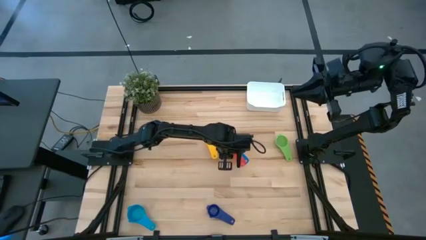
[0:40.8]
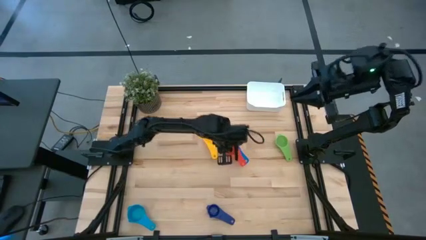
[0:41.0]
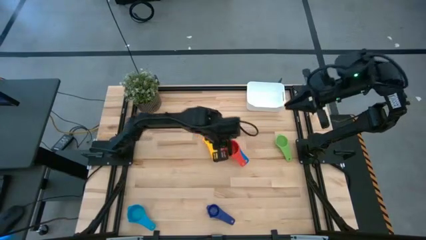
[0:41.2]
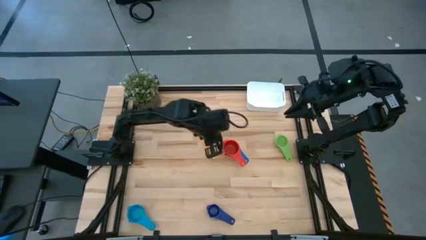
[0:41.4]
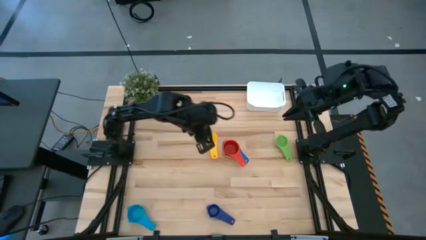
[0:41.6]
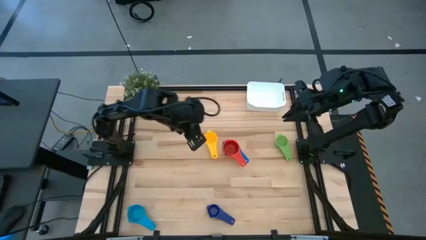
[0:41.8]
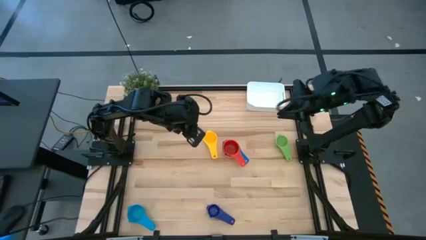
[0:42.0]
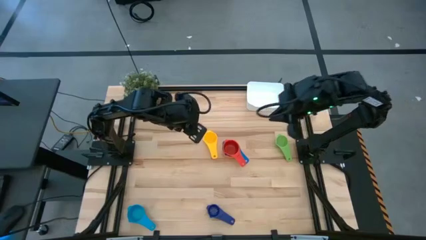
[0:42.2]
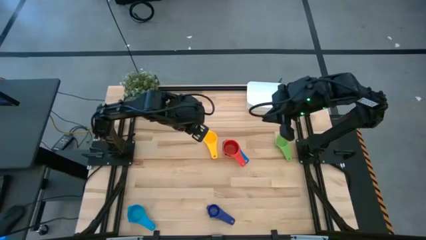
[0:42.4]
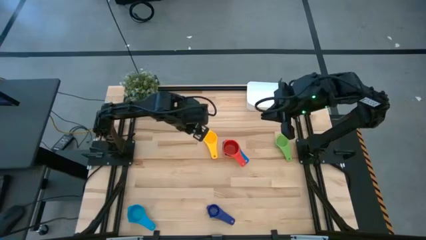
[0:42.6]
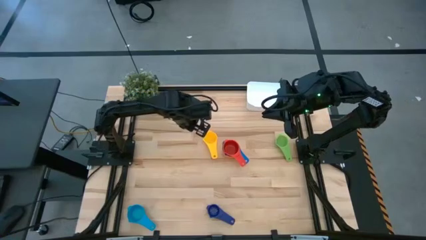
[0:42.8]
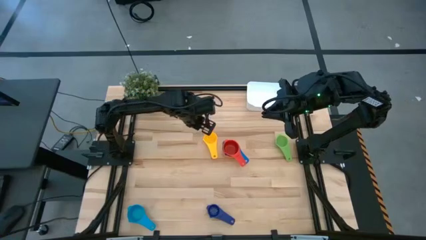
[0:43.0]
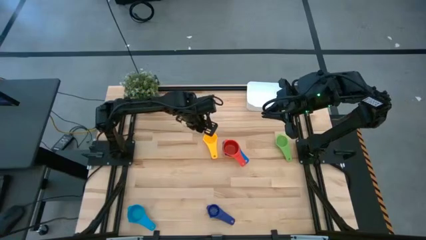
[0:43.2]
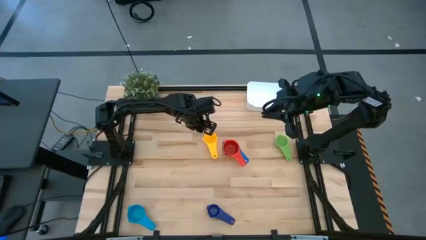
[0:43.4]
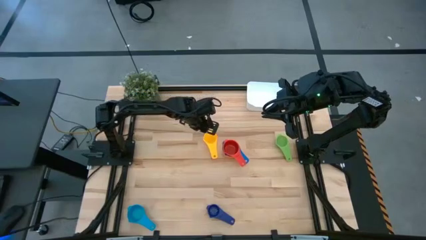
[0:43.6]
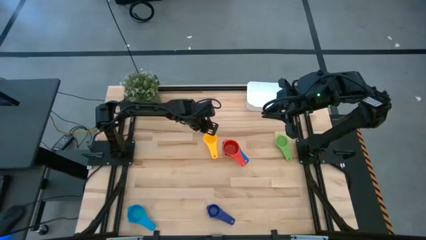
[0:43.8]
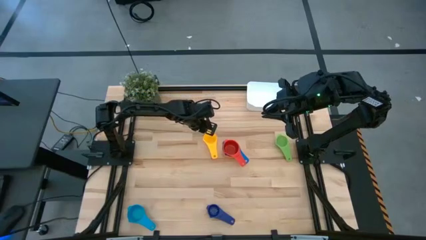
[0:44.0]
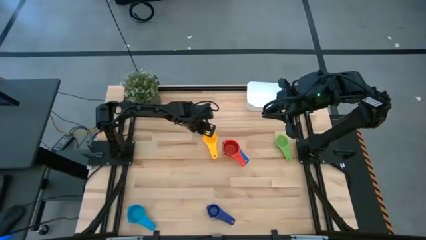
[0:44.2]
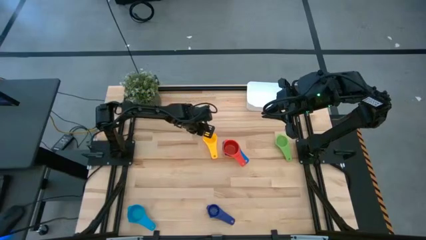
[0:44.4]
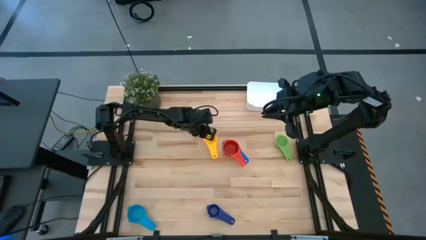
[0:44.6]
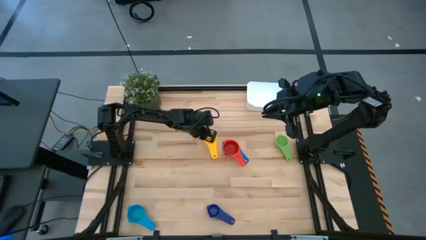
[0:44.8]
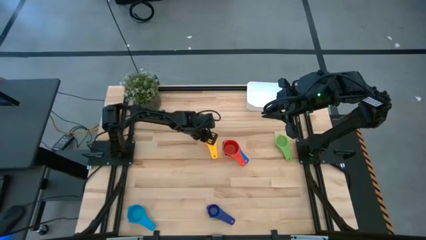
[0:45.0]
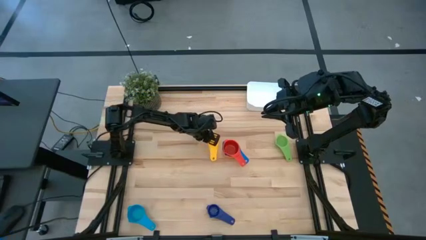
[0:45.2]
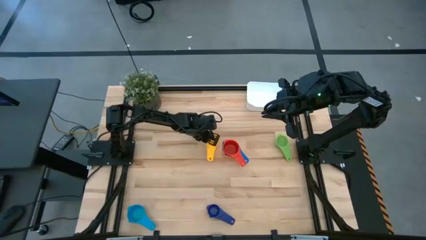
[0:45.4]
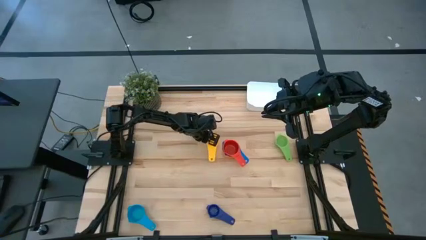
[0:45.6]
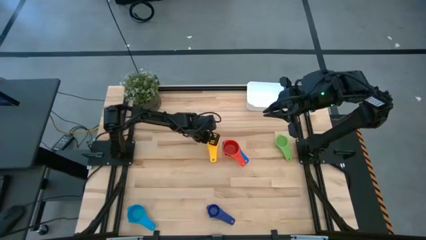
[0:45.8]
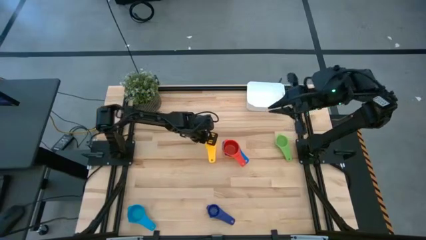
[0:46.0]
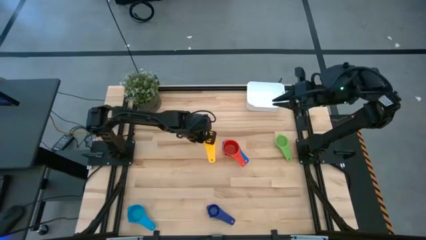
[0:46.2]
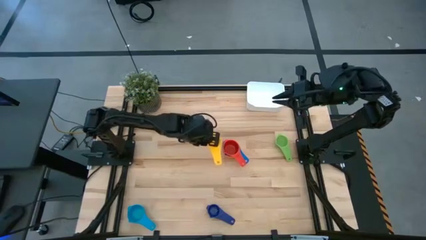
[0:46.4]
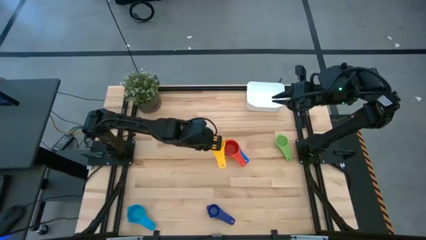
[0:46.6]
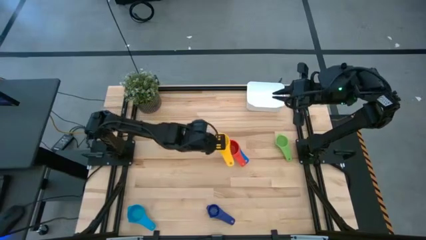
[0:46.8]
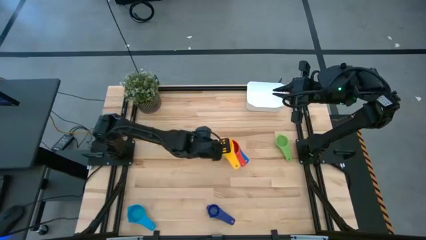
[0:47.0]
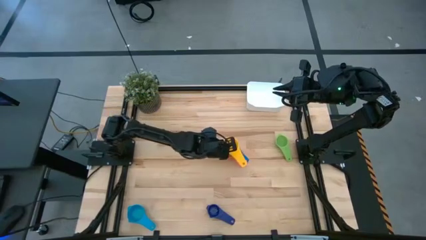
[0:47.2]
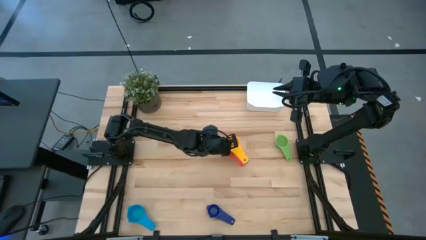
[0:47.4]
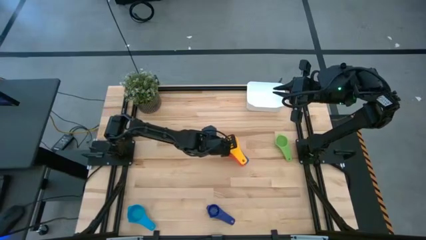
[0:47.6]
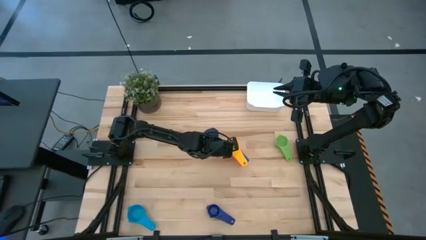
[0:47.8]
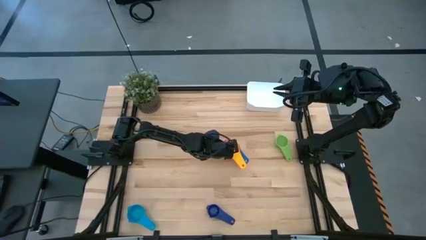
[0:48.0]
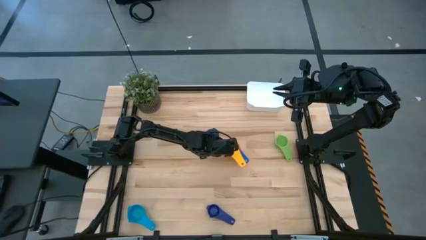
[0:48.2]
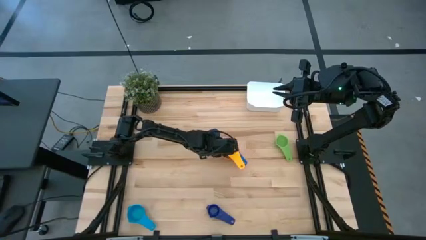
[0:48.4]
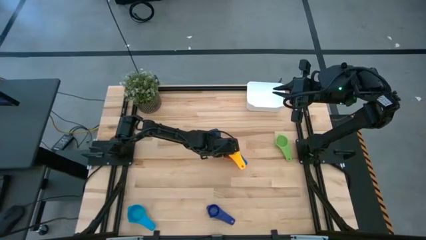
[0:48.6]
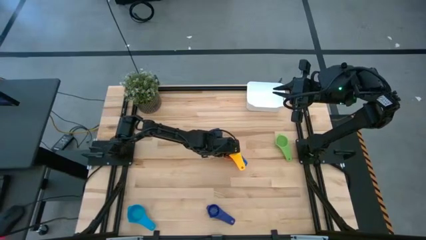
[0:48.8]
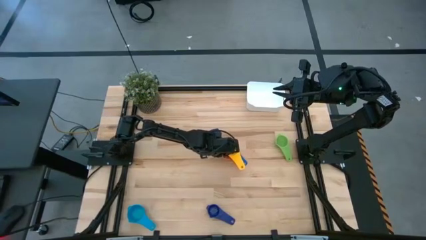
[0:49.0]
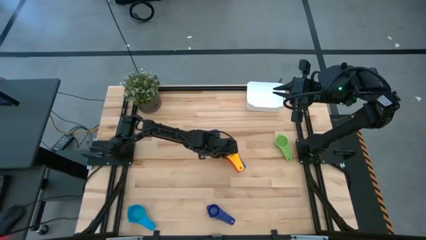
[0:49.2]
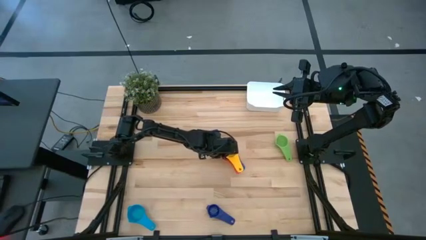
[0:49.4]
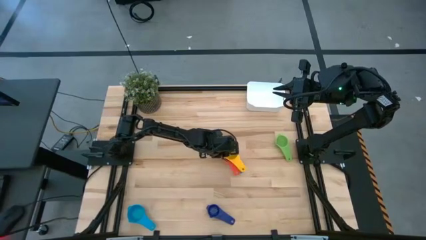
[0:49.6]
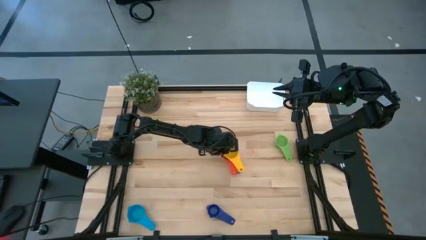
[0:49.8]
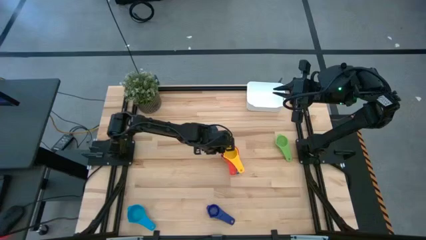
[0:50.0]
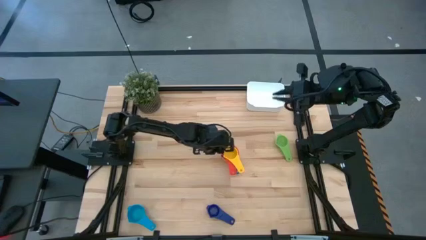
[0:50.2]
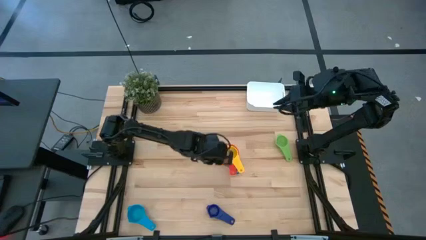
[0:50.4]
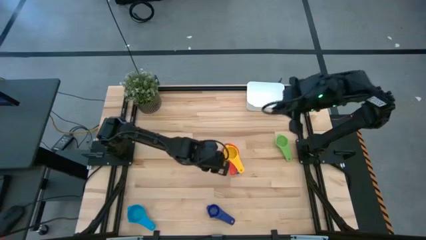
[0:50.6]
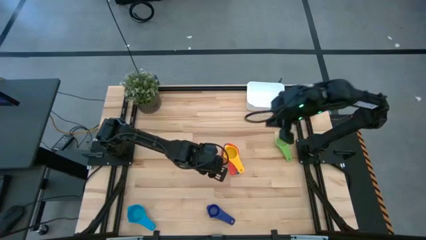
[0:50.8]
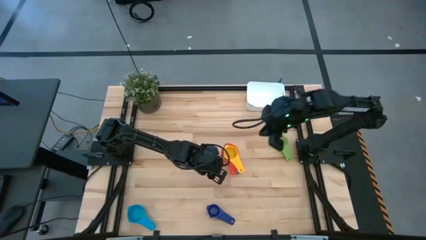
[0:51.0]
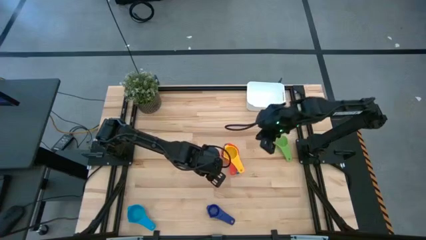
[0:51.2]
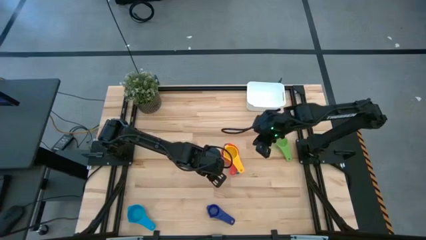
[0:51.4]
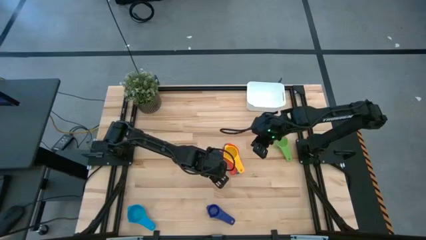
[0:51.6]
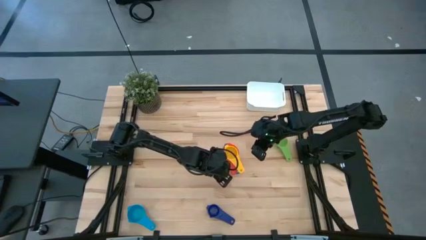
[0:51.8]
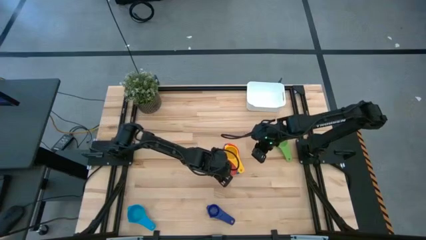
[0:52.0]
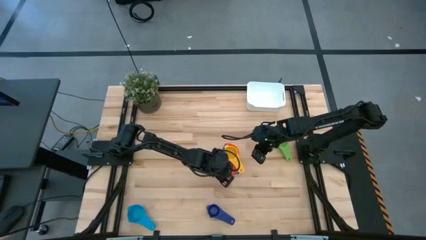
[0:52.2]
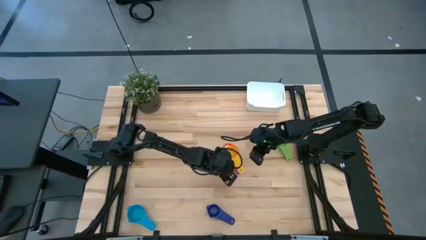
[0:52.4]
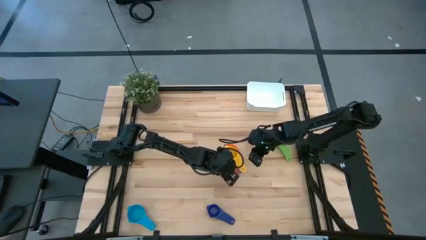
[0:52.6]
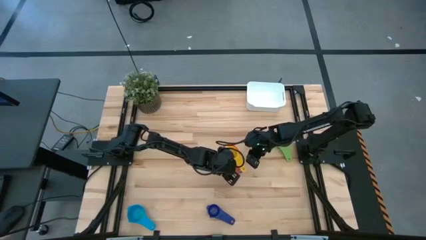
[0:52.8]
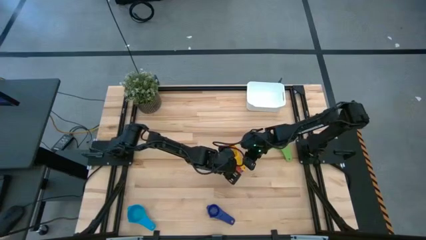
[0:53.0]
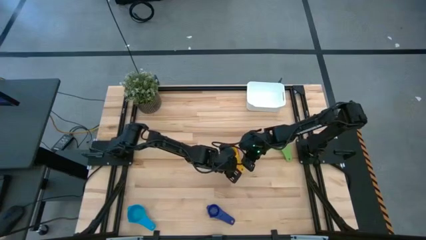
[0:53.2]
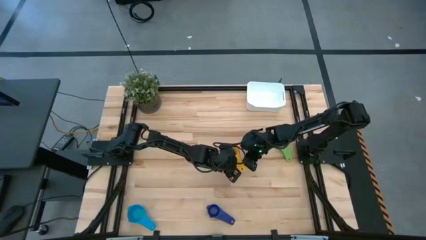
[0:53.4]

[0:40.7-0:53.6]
Task: Nest measuring cups in basket
Stack the yellow measuring cup on top of the red measuring cup
